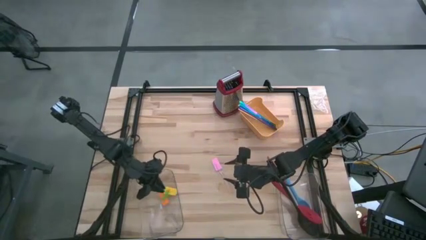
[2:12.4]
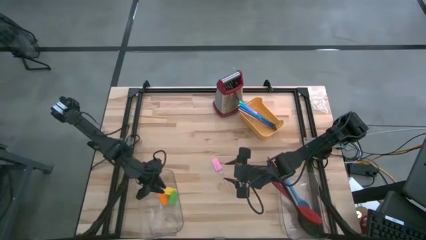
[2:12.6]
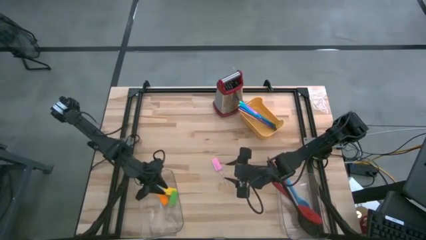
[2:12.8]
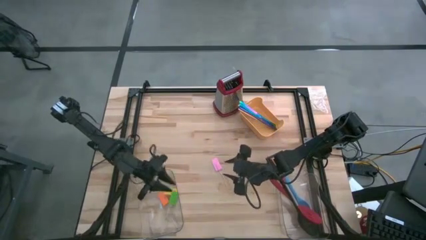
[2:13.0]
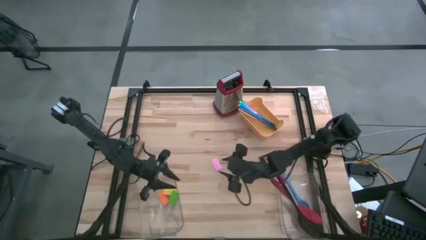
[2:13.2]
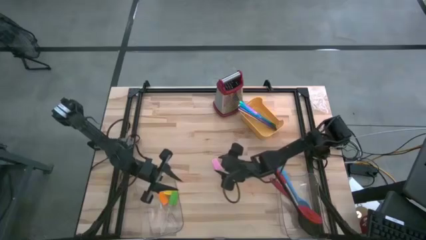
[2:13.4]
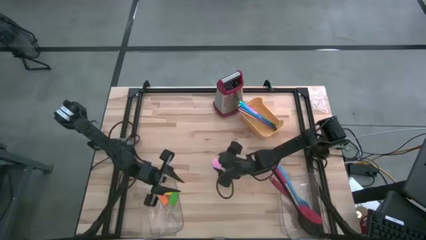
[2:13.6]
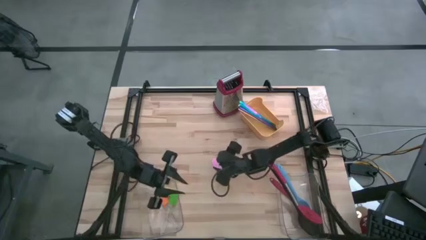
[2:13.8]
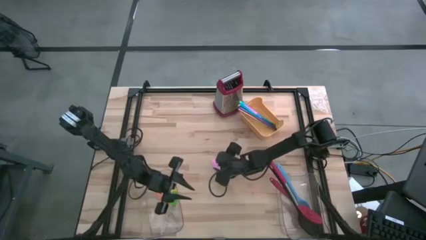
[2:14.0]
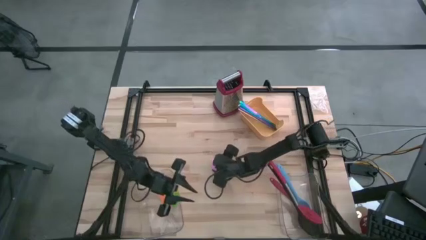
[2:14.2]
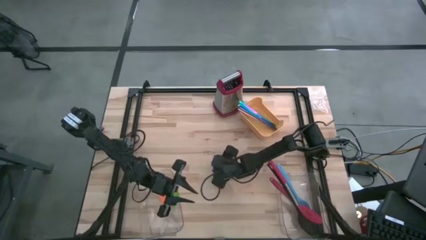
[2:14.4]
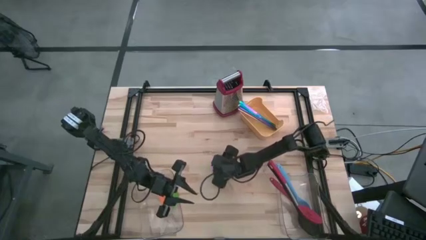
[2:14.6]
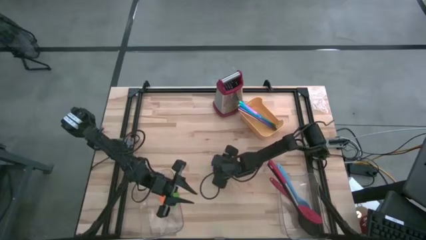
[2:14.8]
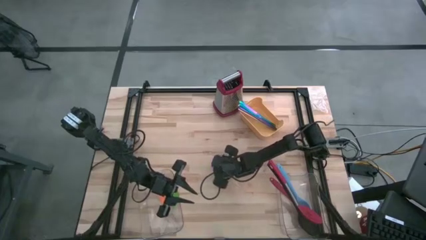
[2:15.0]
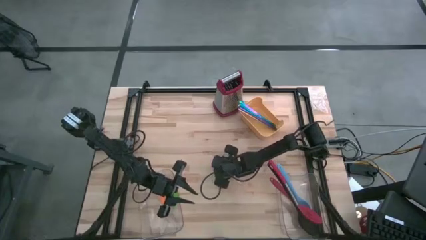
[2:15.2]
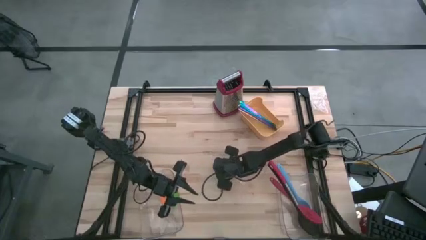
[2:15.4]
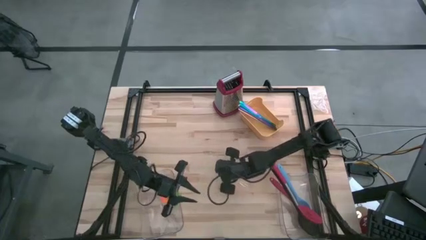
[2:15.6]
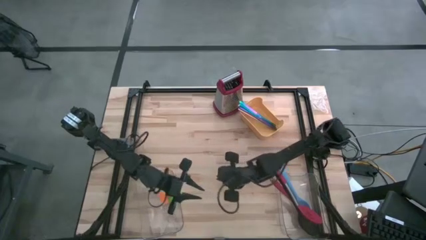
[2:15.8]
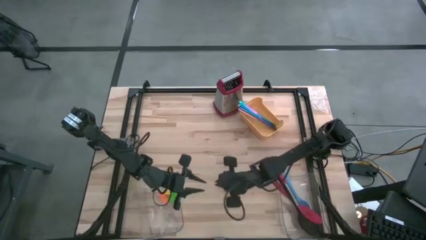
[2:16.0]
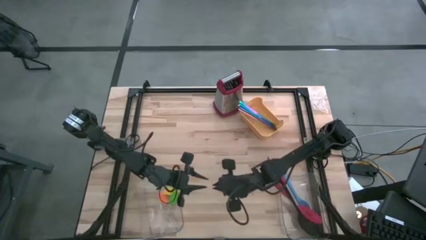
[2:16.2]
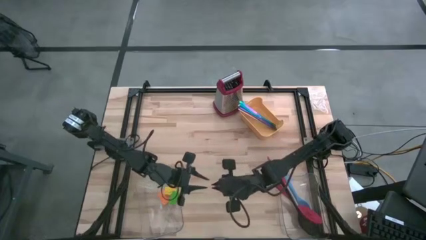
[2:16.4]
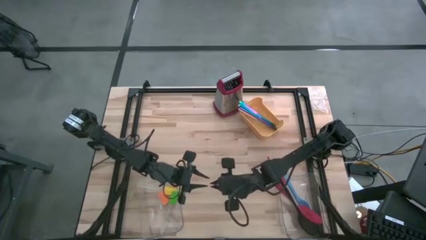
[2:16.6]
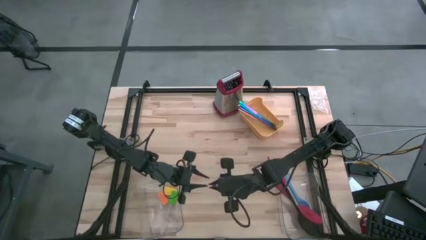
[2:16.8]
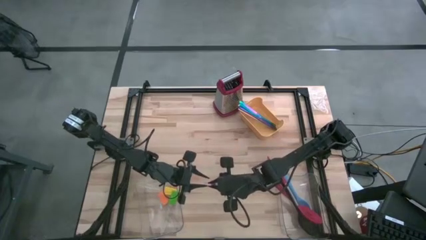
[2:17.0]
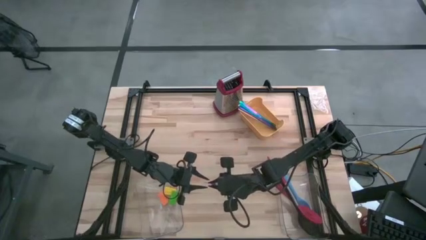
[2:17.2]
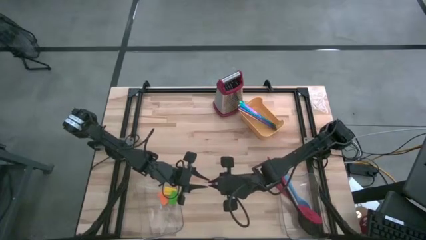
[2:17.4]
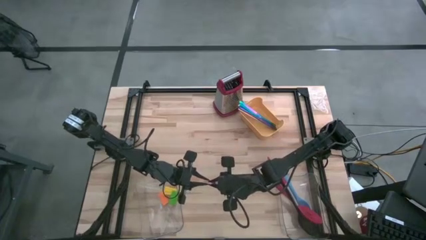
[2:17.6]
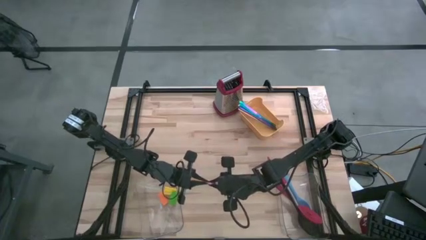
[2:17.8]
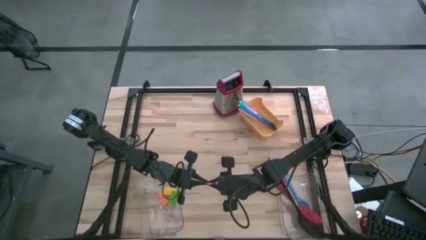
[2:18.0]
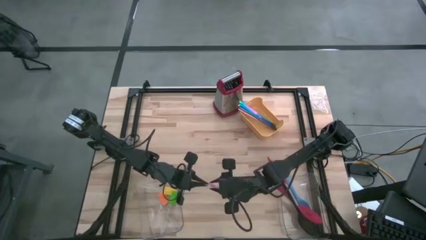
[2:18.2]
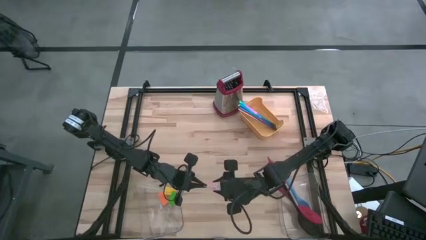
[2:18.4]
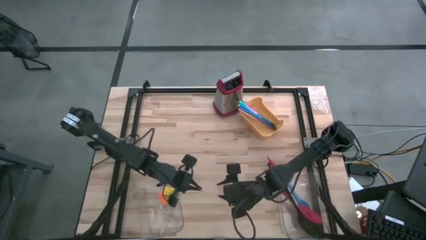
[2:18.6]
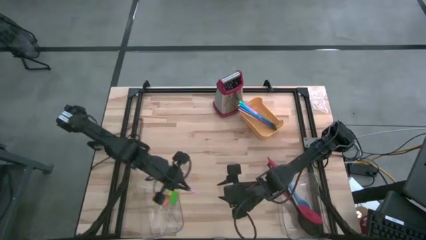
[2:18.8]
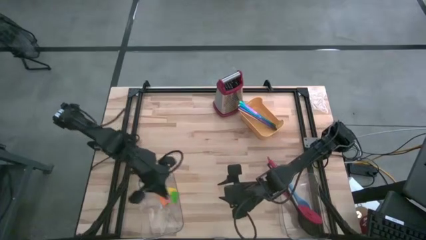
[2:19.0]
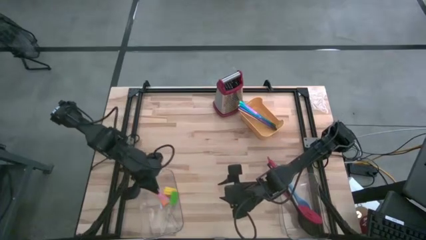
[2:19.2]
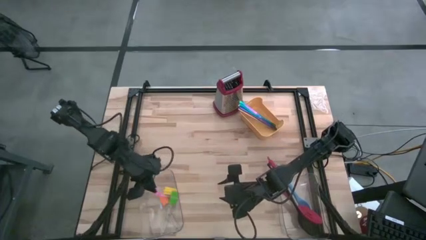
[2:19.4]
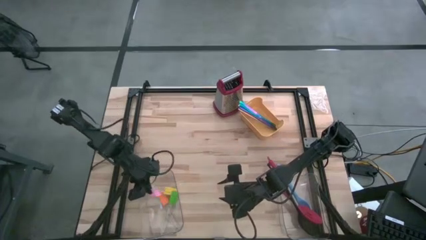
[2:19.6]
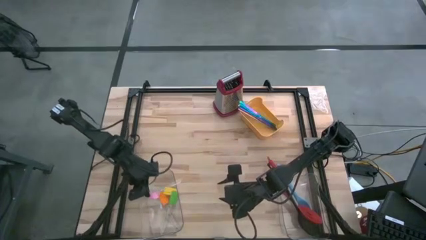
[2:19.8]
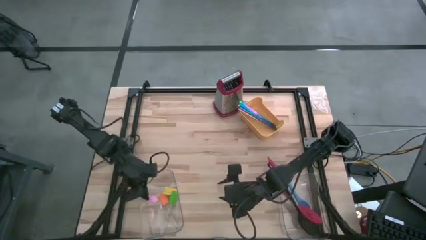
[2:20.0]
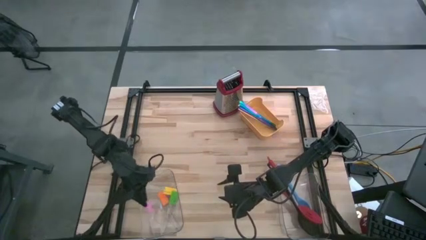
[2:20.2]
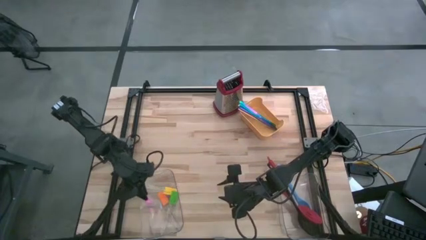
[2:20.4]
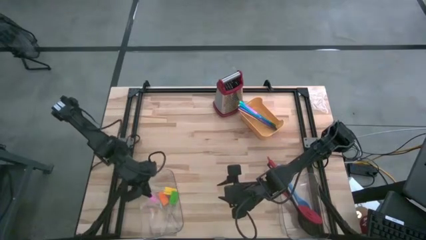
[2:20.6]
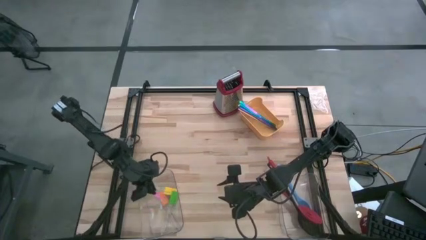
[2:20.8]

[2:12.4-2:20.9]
Task: Pick & Place Kitchen Items
Put the pink spatula into the left transparent bin

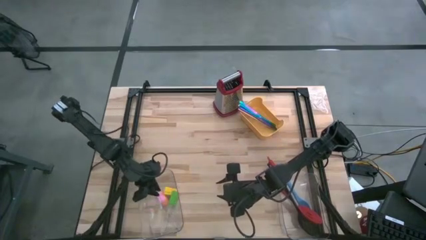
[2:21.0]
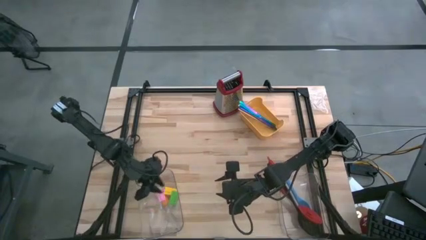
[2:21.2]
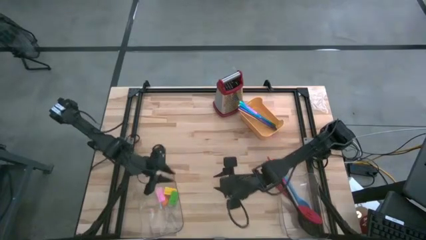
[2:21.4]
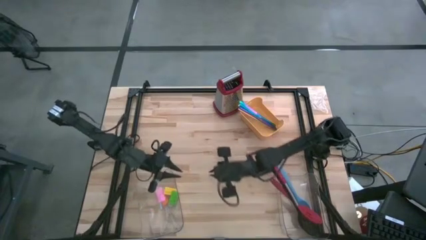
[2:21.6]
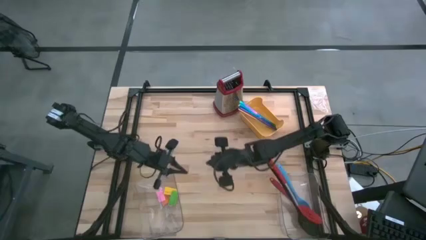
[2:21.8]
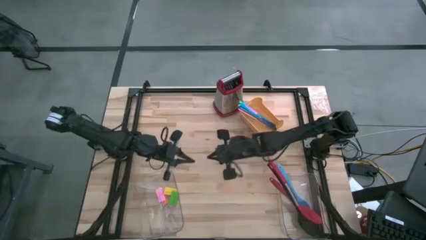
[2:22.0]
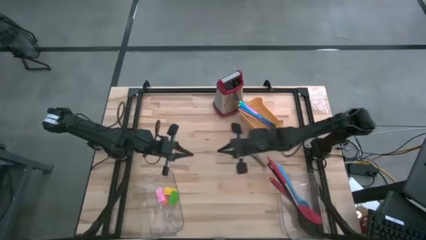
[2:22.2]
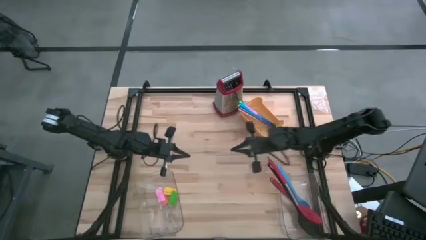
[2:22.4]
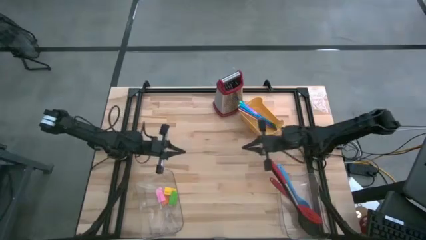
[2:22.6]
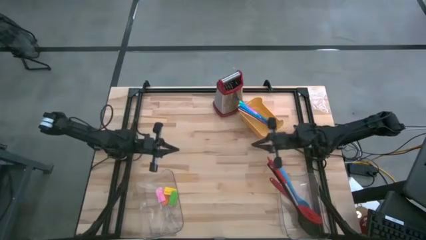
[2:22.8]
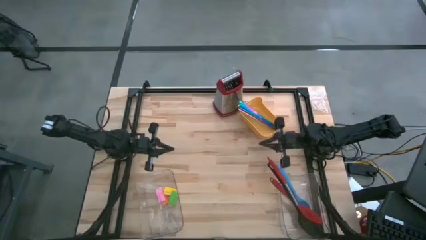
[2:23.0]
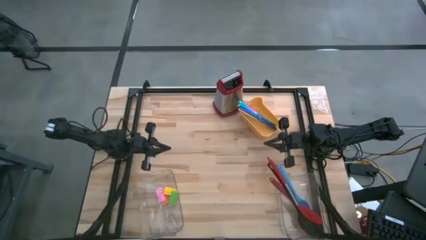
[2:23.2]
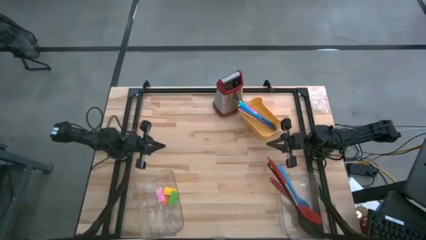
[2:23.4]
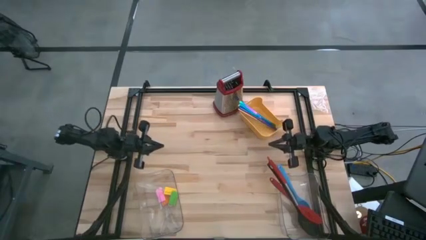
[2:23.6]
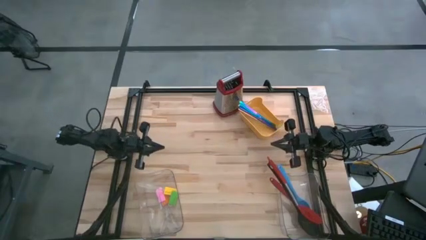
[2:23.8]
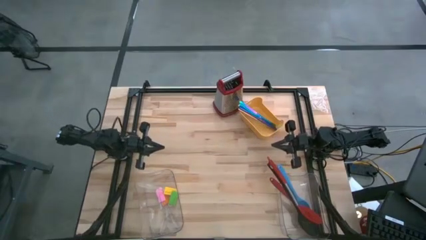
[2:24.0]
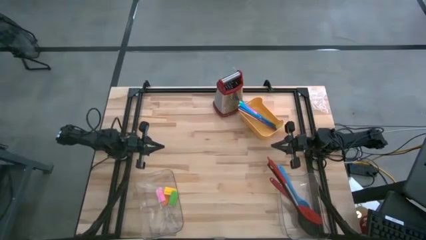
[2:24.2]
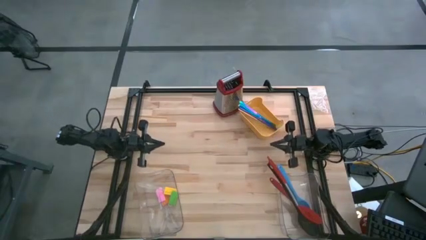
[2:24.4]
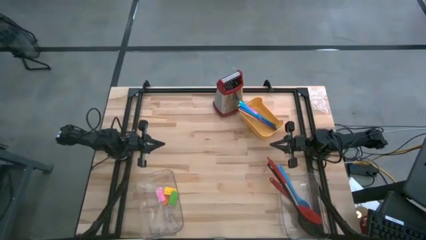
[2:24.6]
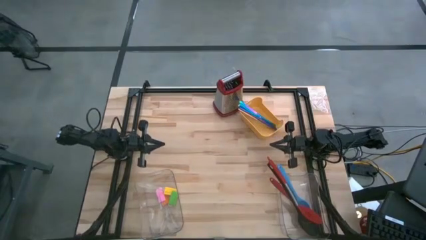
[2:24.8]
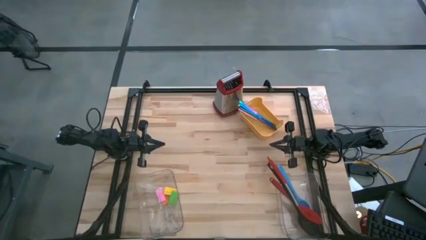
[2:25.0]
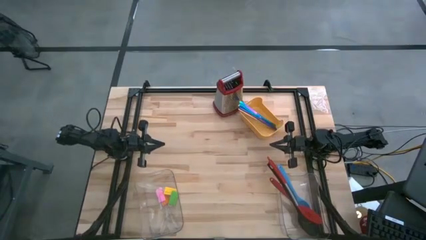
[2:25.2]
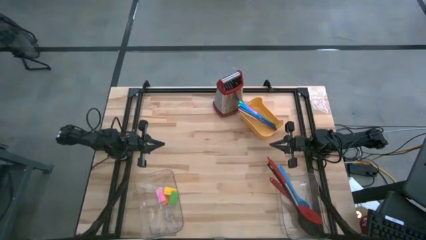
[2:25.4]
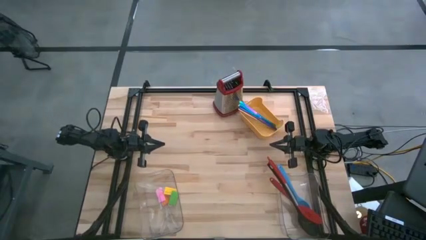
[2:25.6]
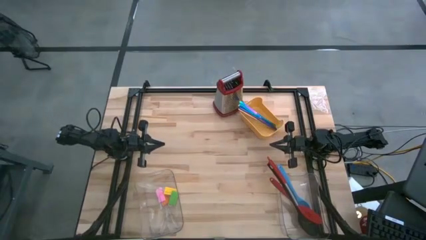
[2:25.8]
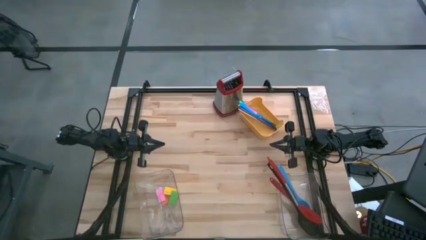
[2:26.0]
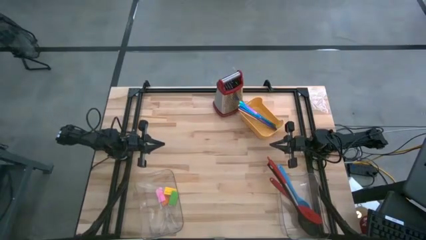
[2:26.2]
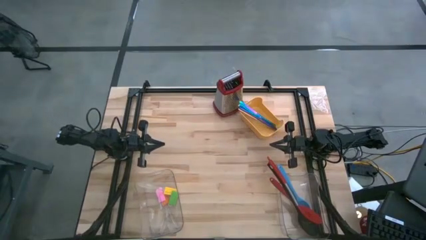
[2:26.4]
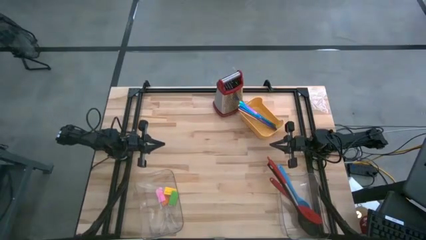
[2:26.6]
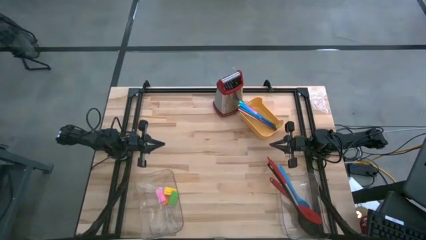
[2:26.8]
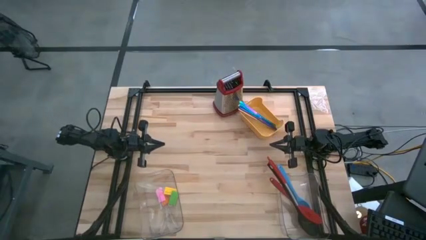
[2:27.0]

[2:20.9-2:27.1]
Return to Home Position

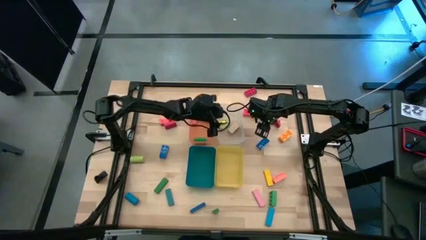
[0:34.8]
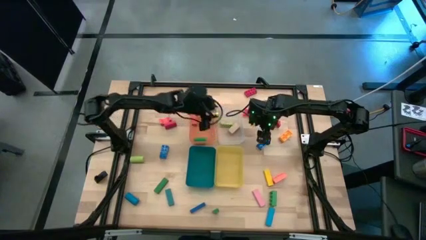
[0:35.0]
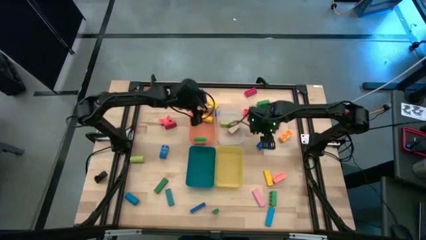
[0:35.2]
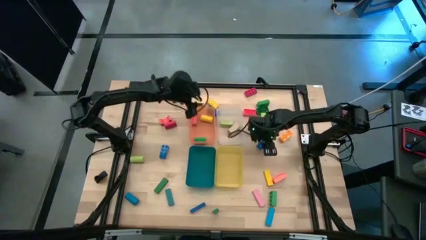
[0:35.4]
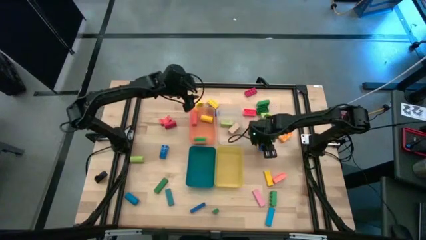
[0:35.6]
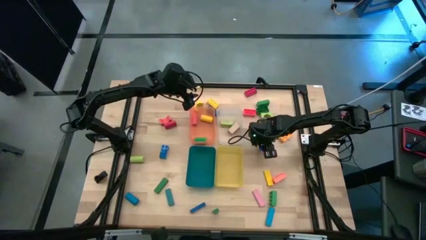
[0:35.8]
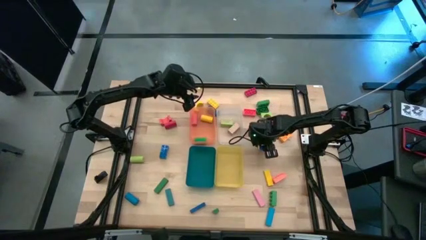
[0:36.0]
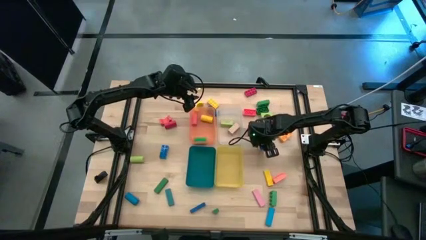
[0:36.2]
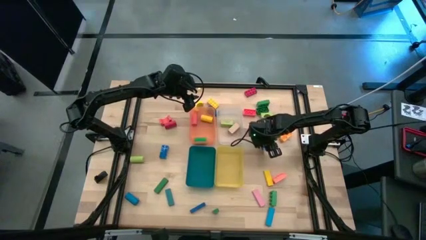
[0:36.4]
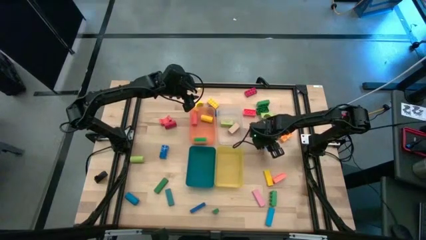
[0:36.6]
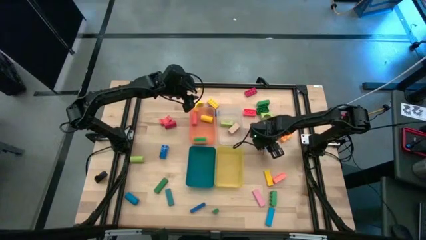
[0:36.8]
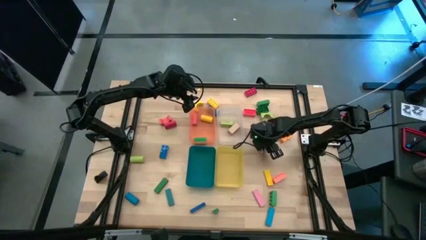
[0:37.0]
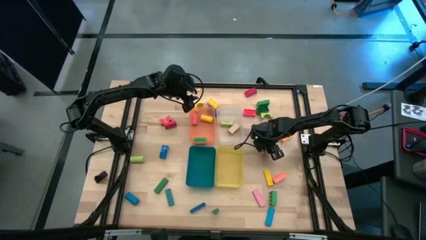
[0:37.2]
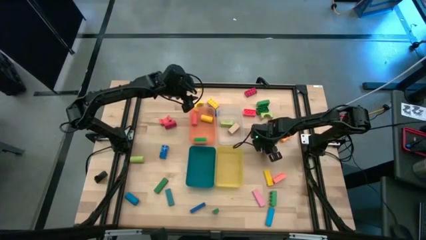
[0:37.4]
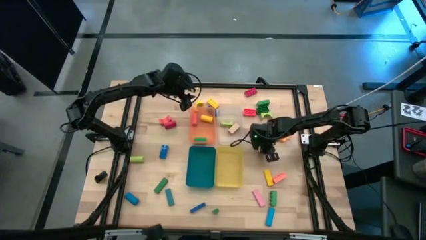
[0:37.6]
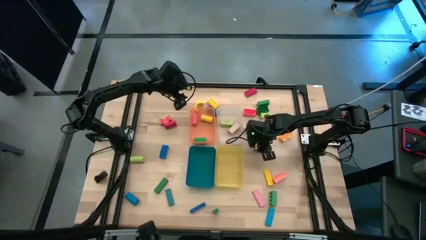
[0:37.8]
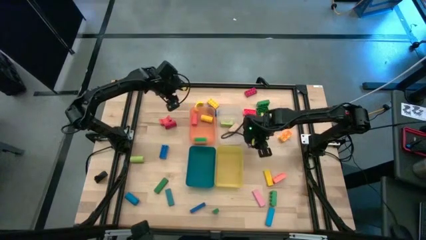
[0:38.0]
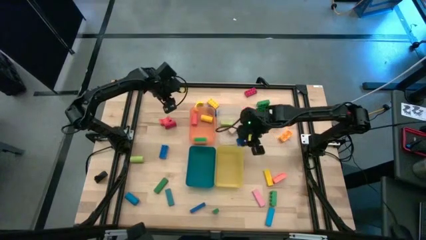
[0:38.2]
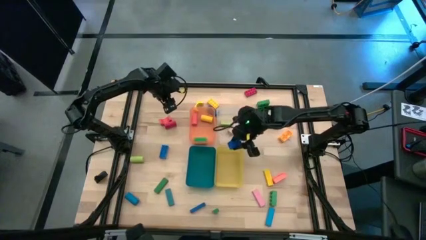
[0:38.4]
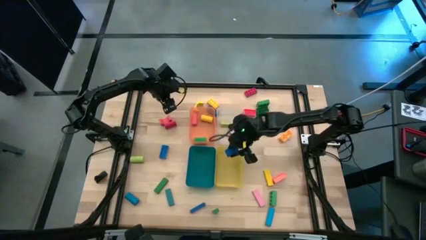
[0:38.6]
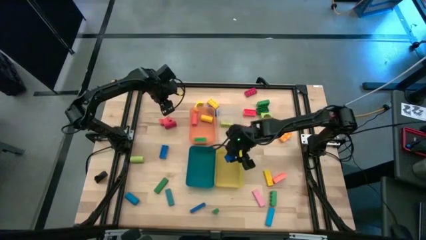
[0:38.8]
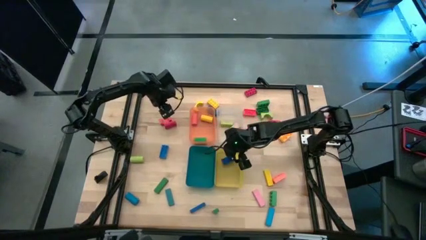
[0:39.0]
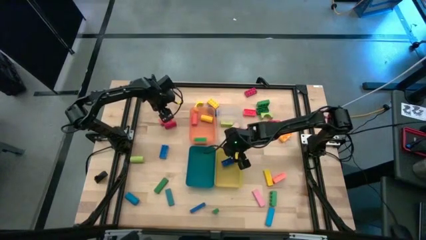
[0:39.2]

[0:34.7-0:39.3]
Task: Sort blocks by size
Put the right blue game piece into the yellow bin
